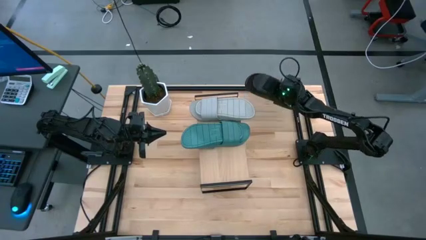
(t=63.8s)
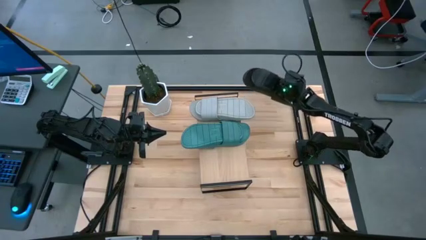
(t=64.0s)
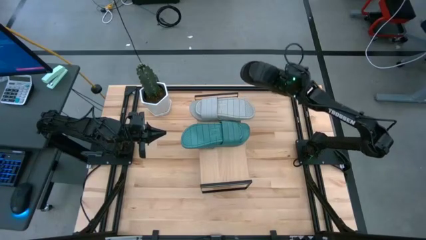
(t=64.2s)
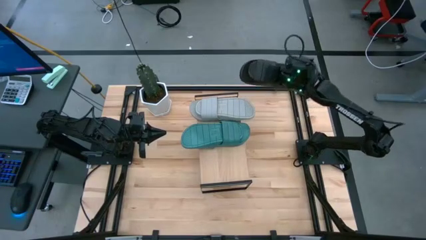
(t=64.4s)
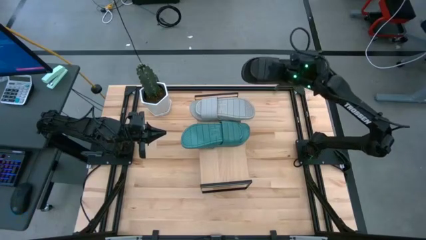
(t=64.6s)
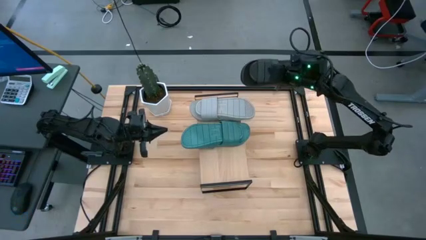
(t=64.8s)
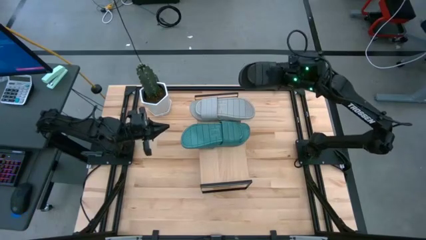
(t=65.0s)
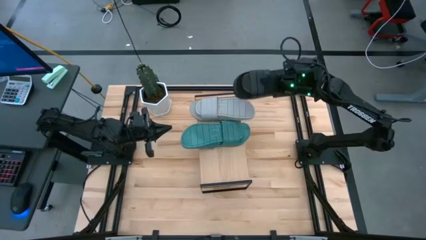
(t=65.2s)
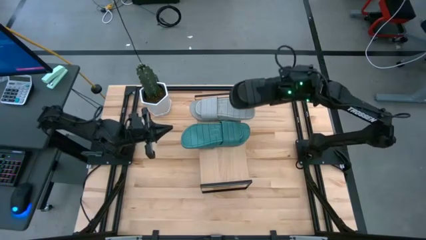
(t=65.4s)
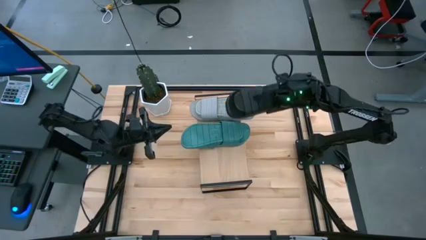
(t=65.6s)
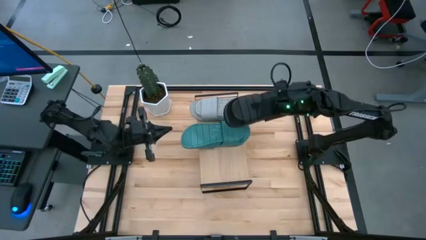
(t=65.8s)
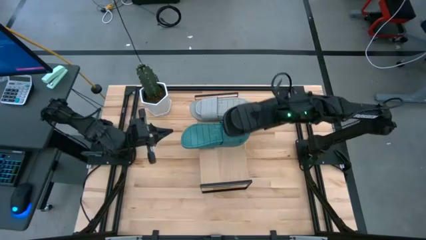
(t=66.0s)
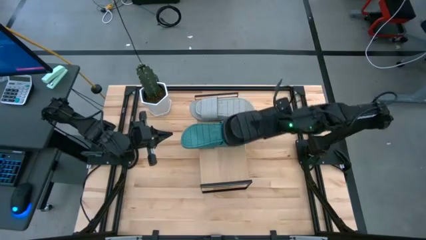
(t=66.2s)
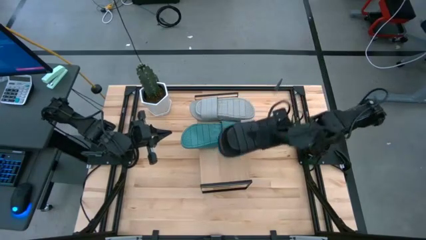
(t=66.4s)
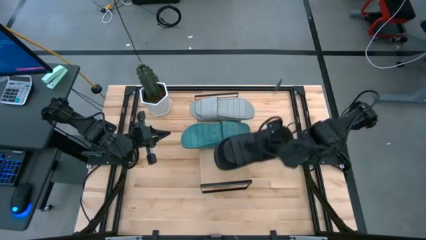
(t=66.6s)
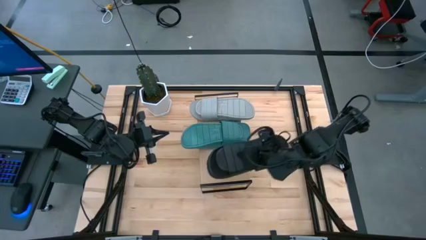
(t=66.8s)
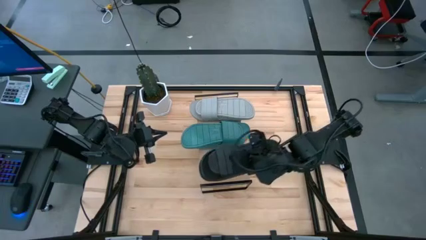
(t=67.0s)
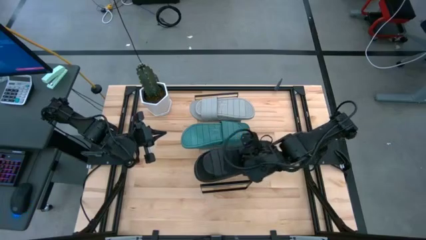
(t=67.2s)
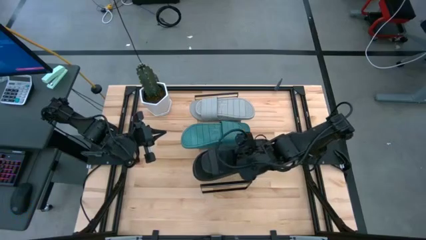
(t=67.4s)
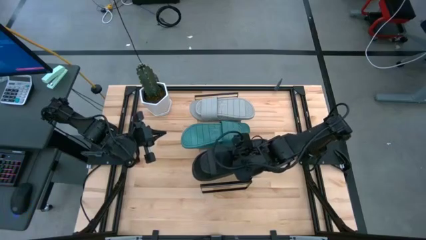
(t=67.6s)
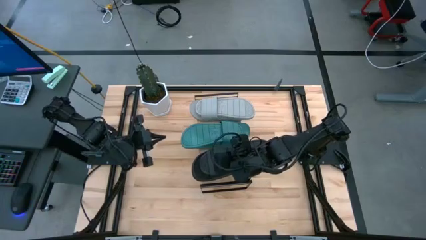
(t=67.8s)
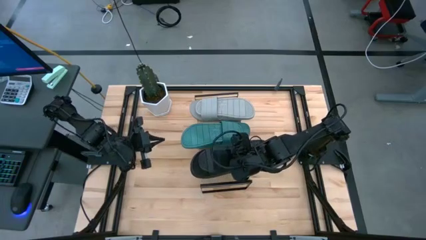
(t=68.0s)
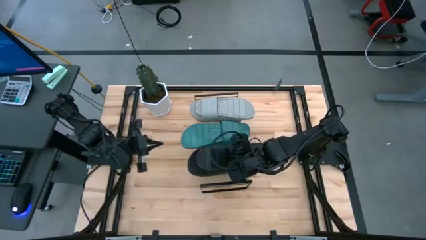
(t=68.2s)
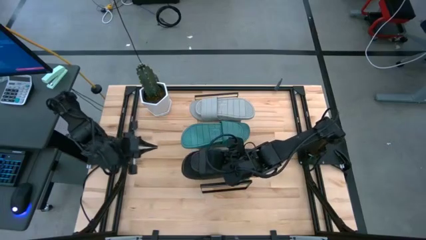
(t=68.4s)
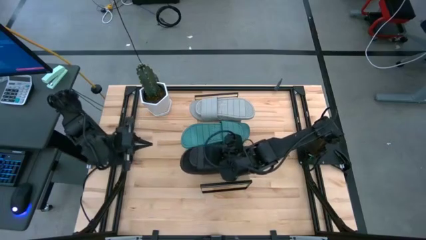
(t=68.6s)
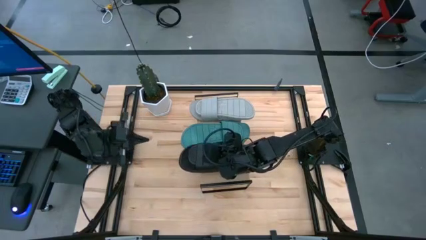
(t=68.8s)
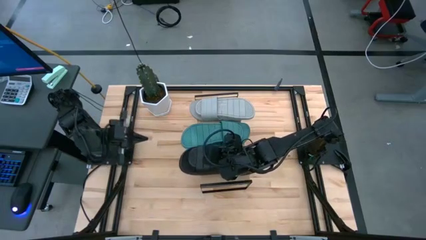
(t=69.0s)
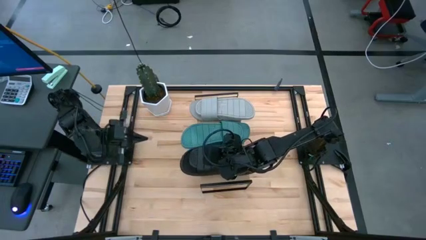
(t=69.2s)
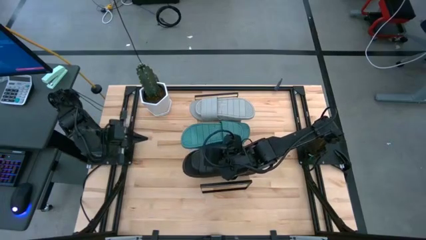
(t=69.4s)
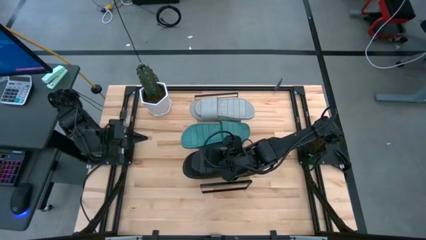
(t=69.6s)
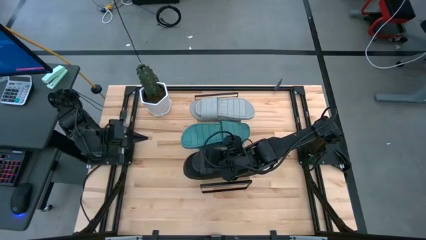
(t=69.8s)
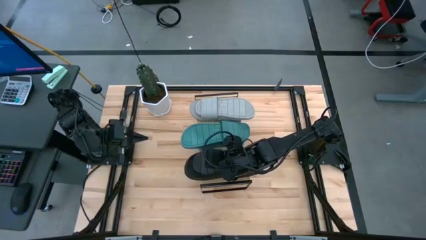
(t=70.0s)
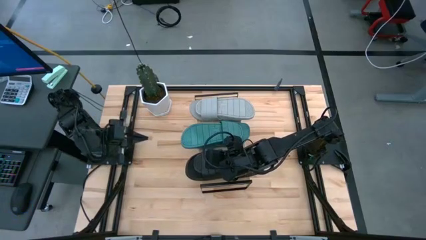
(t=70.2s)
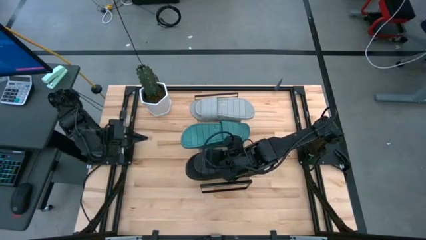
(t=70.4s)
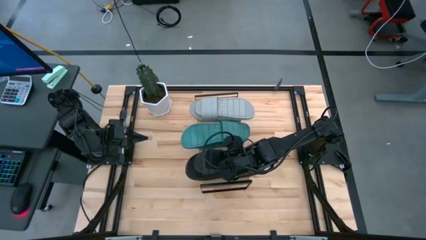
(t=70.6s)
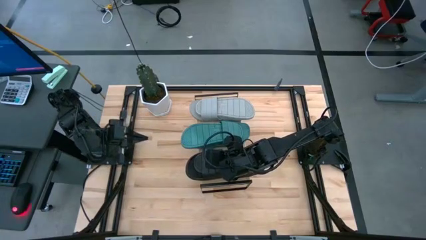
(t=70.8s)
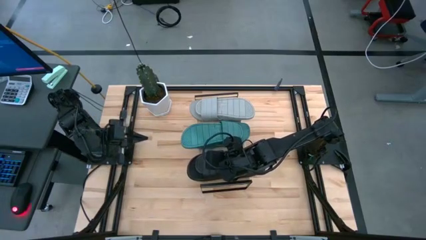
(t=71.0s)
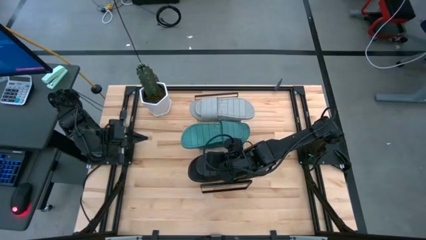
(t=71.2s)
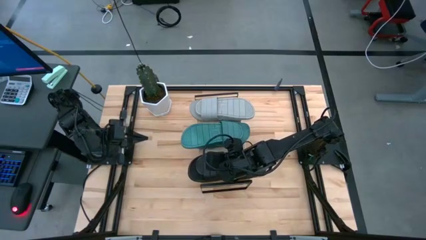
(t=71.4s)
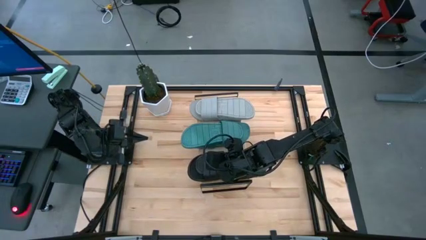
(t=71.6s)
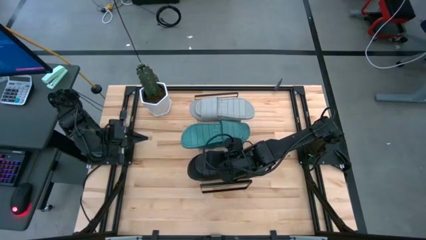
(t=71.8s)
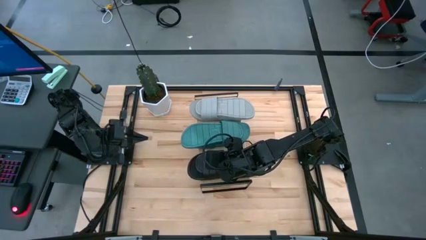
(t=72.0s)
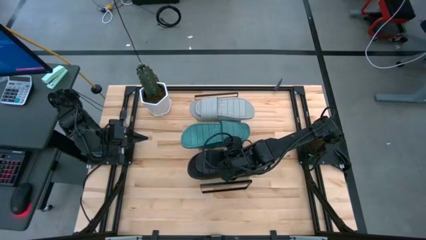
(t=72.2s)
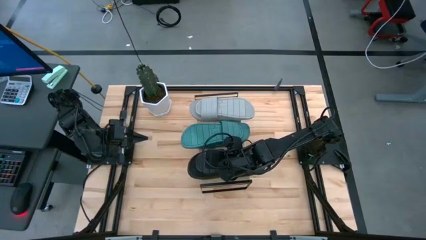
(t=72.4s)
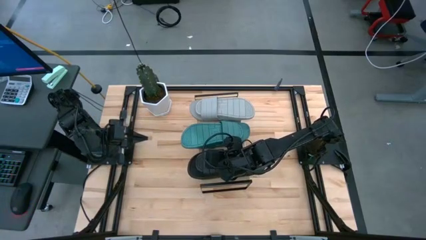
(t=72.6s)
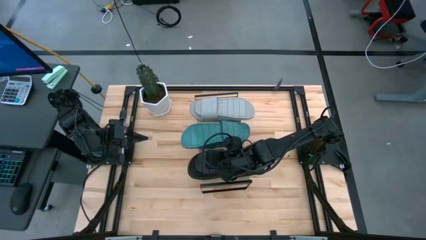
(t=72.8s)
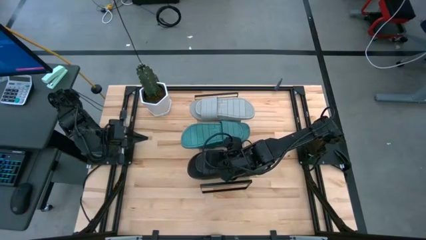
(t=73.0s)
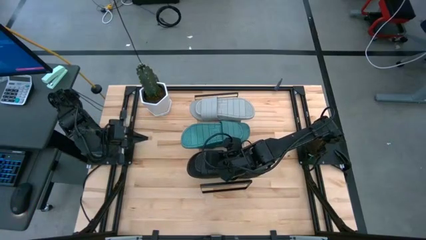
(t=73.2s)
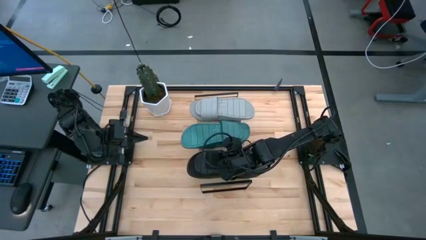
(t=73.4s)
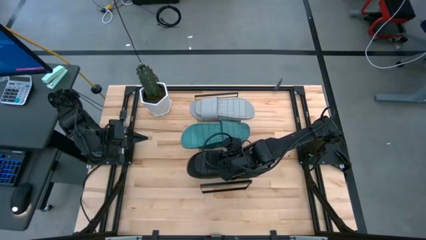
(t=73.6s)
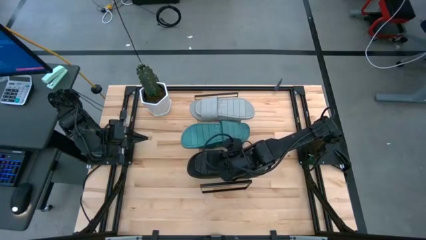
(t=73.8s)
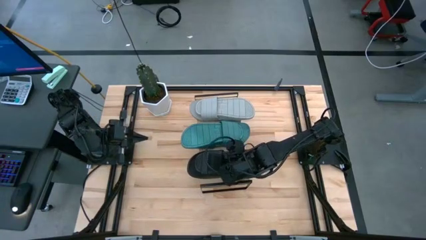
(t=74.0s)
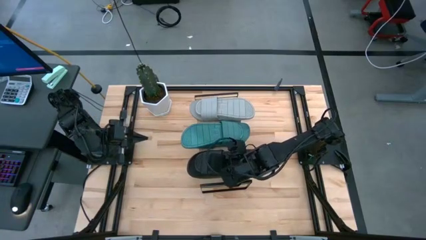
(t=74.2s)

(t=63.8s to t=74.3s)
Task: Pick and place slippers onto the shelf
Put the black pair of slippers on the shelf

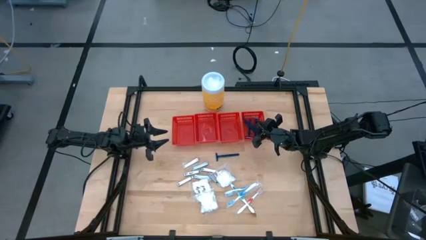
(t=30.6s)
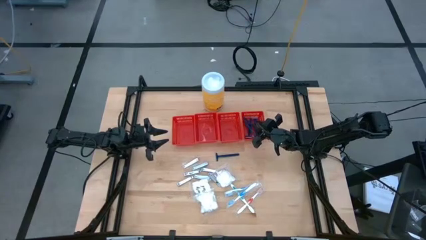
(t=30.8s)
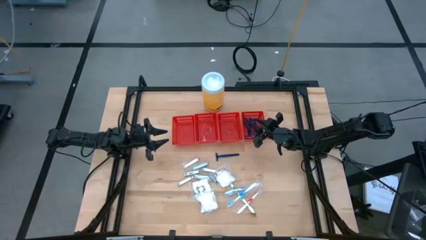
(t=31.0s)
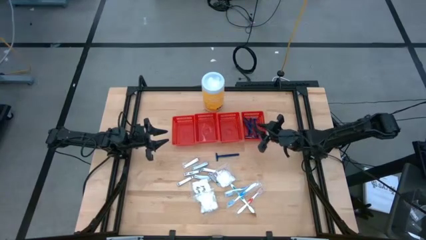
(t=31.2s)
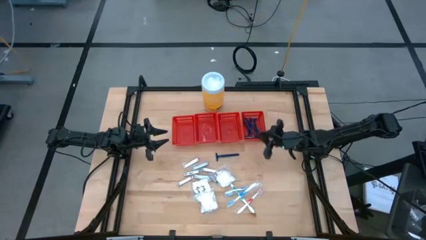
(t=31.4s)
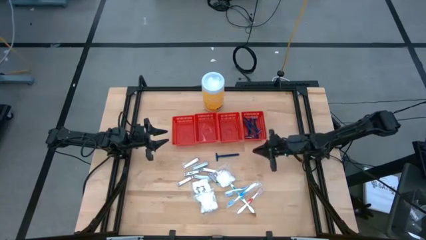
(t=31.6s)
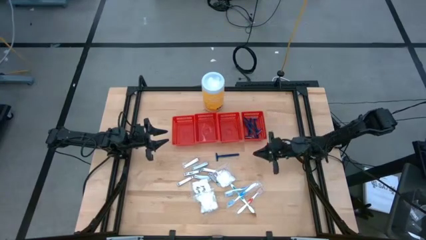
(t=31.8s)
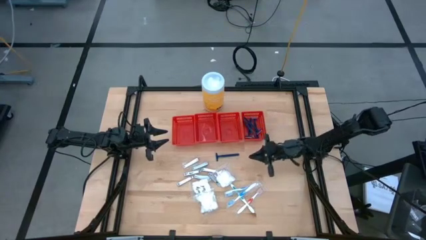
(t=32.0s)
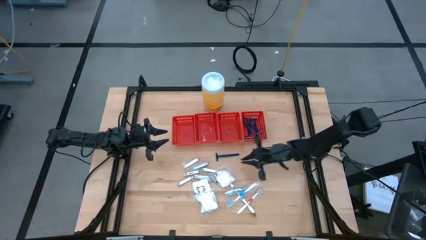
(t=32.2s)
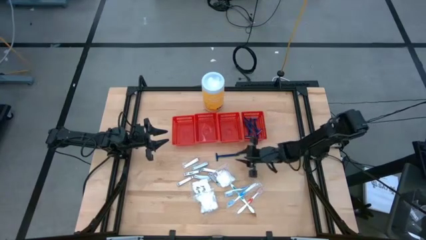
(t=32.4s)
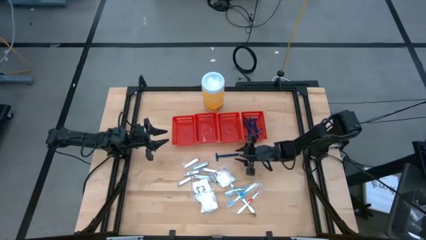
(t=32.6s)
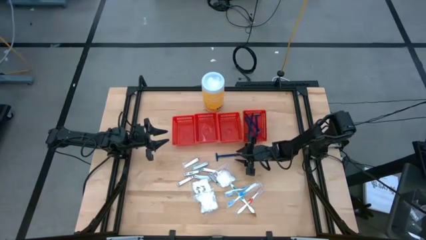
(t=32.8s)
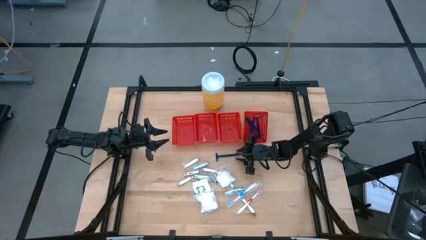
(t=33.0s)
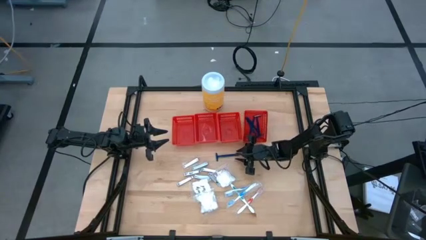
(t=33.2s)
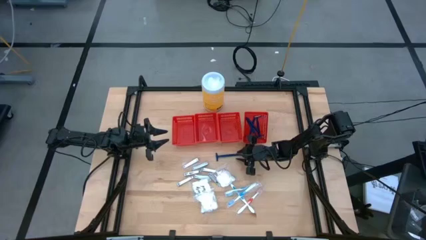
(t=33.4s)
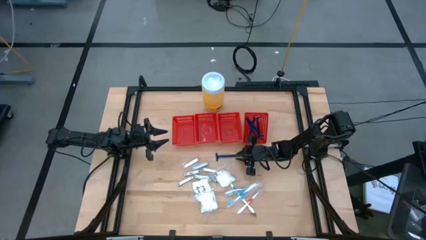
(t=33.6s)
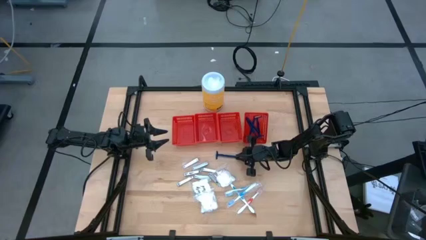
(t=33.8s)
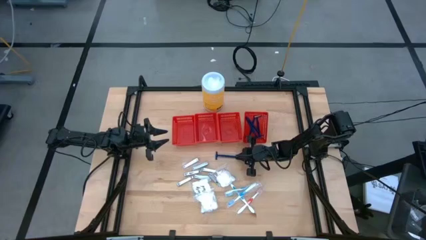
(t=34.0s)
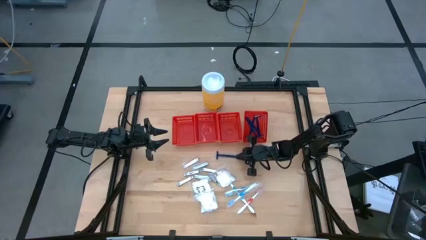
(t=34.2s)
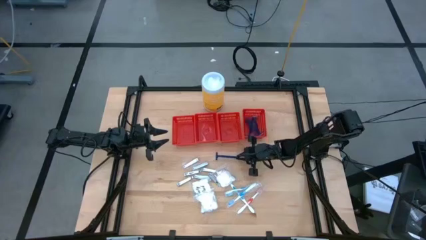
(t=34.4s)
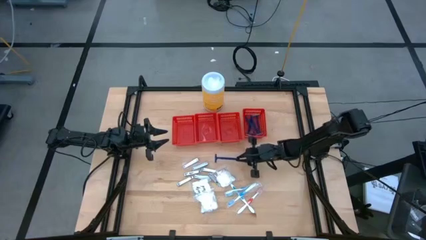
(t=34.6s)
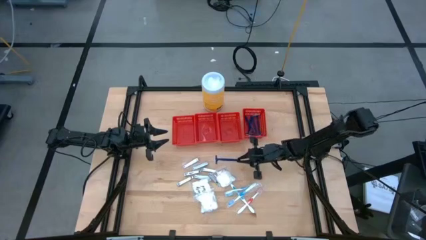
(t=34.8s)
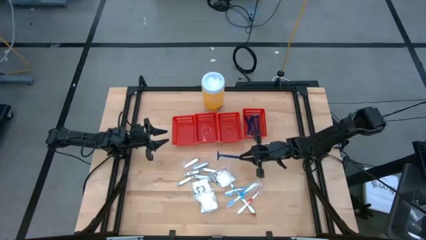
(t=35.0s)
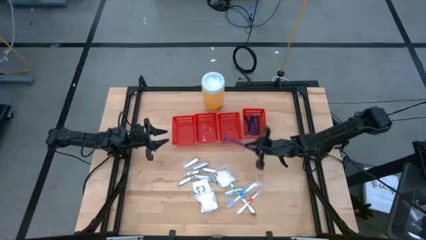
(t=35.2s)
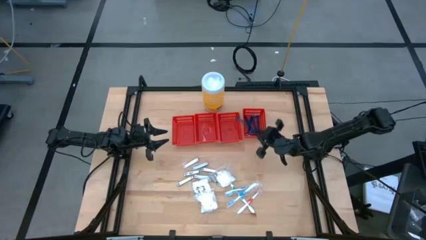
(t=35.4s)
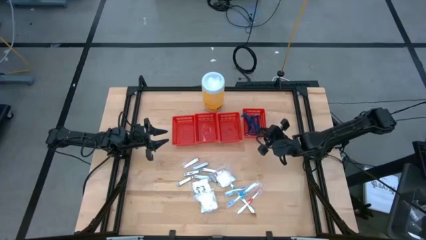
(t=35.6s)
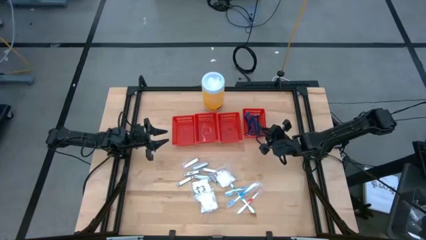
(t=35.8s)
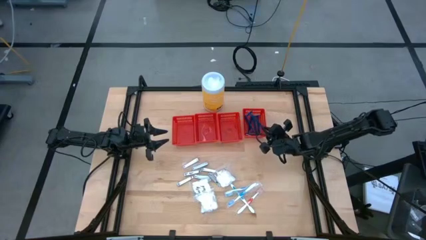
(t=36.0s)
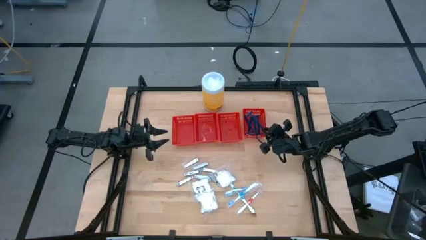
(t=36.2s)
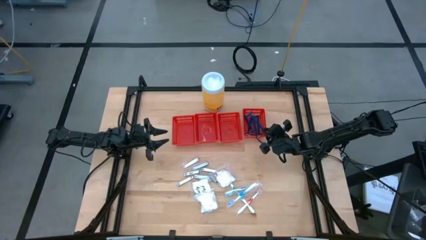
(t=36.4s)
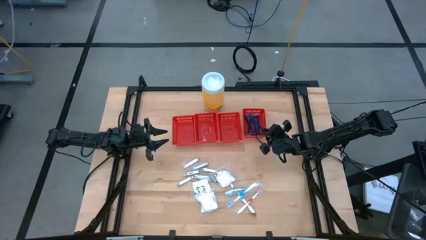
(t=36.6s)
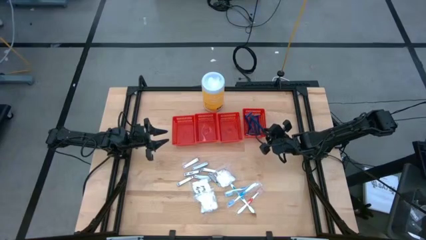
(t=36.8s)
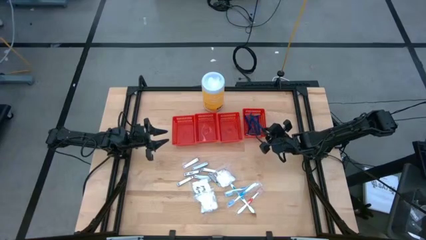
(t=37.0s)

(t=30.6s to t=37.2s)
Task: Pick & Place Travel size toiletries
Put the blue razor into the right red basket

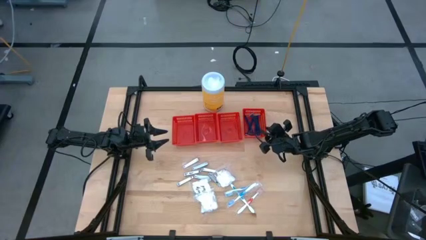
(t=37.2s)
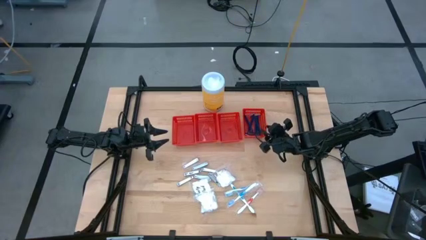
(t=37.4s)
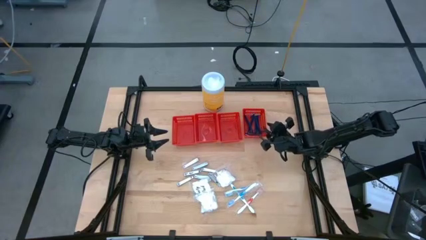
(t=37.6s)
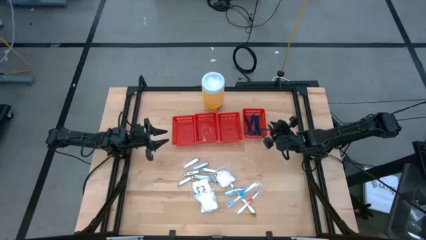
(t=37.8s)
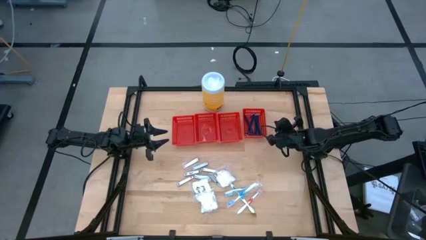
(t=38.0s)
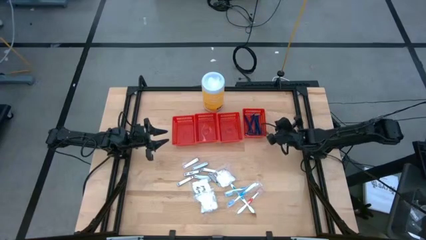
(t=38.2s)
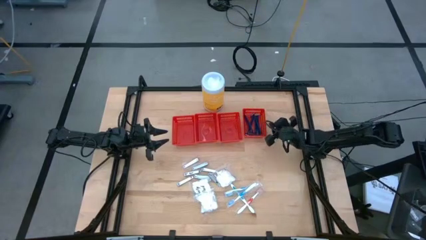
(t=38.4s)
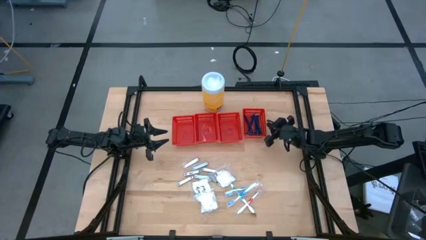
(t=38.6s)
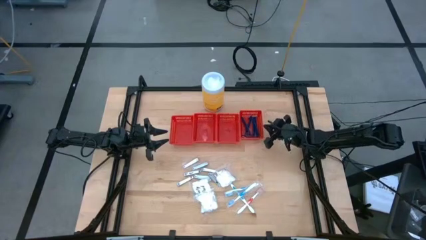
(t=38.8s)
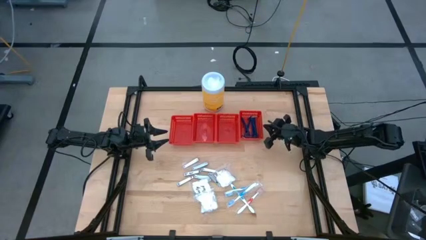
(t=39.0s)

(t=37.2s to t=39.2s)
Adjust the red basket
